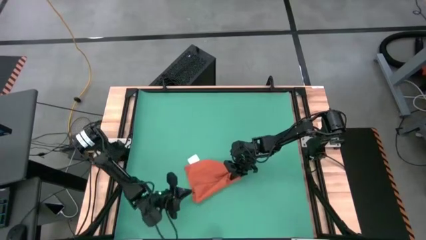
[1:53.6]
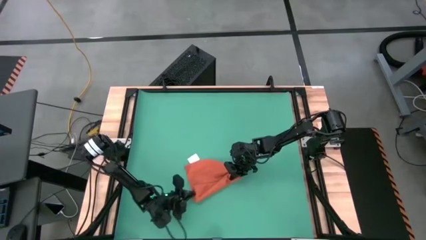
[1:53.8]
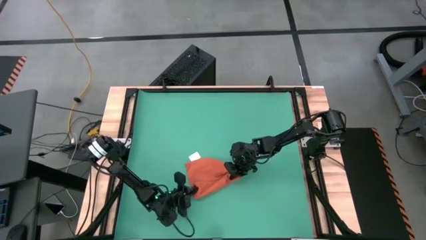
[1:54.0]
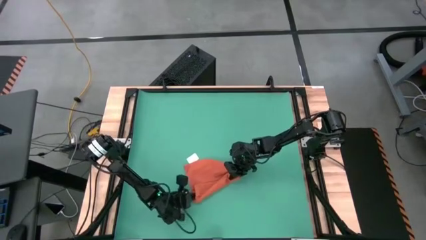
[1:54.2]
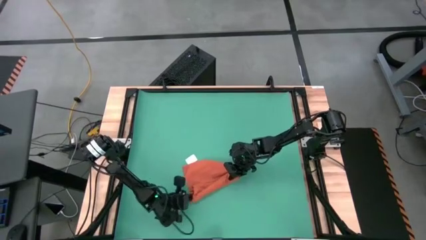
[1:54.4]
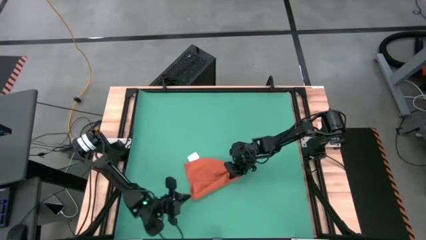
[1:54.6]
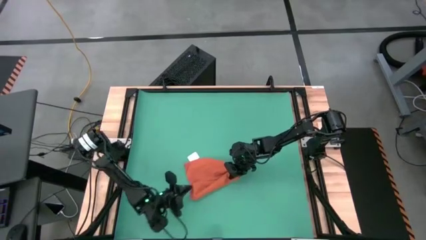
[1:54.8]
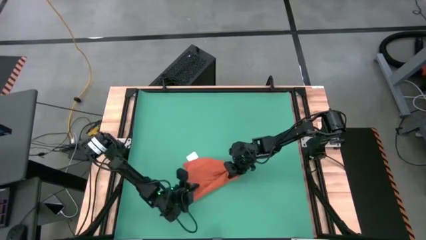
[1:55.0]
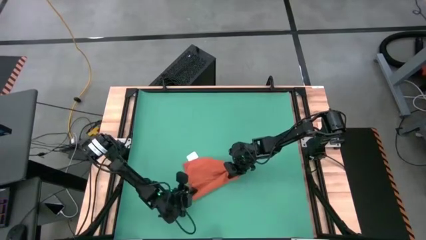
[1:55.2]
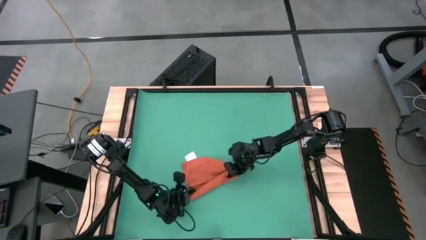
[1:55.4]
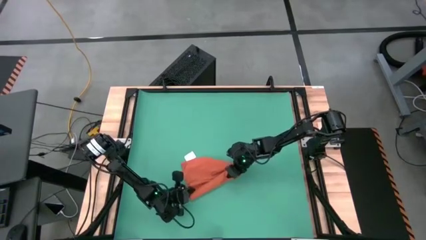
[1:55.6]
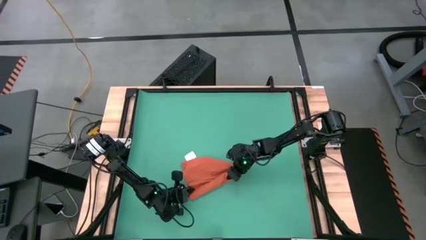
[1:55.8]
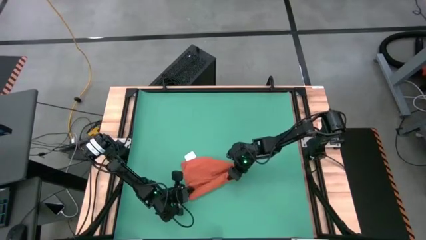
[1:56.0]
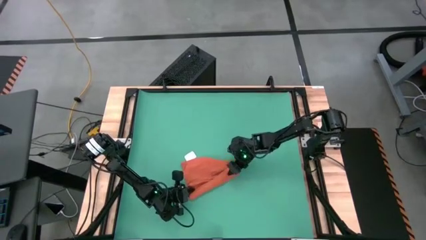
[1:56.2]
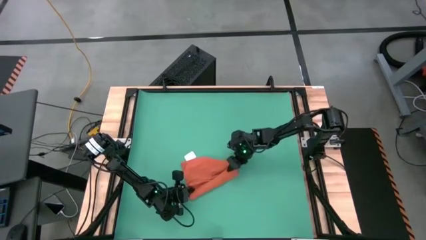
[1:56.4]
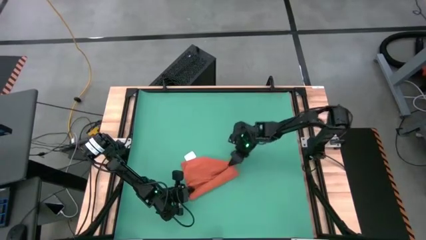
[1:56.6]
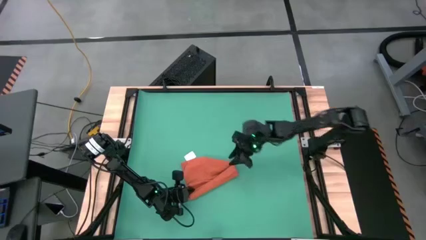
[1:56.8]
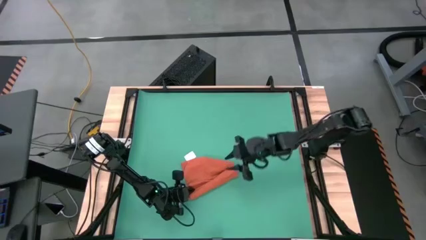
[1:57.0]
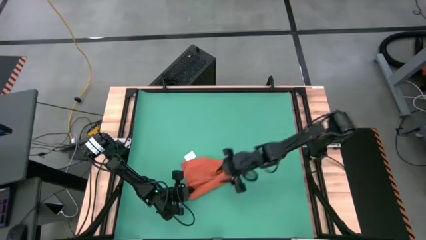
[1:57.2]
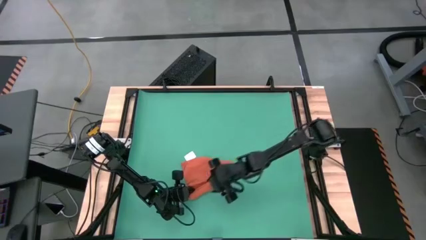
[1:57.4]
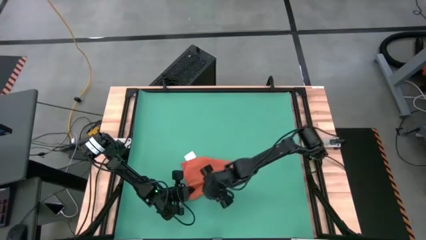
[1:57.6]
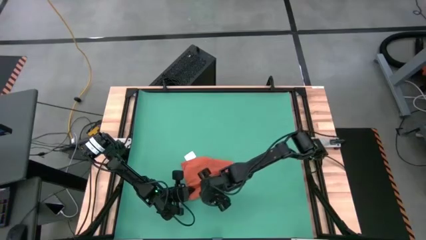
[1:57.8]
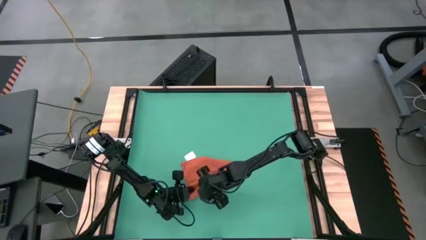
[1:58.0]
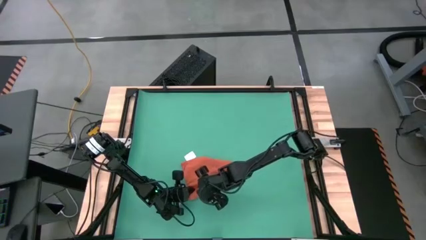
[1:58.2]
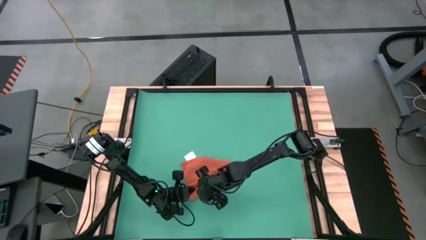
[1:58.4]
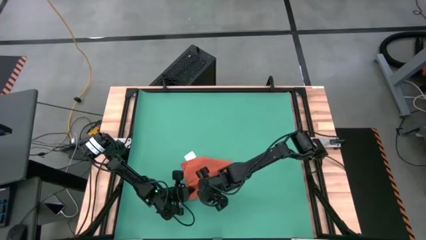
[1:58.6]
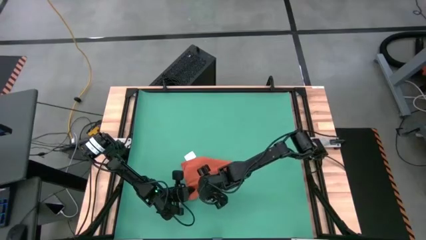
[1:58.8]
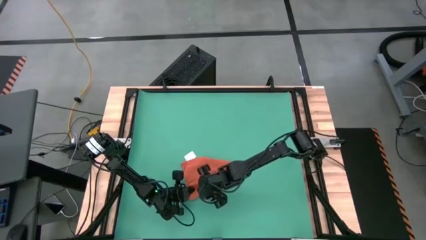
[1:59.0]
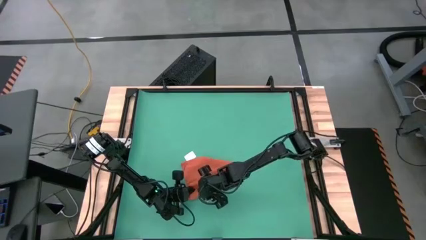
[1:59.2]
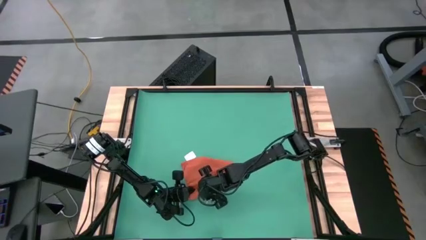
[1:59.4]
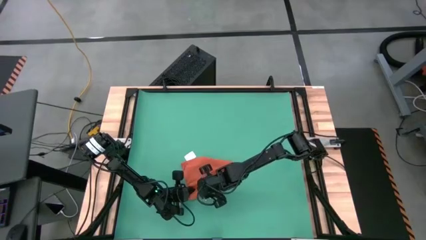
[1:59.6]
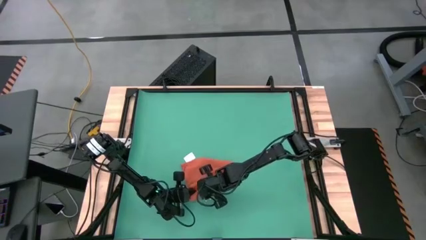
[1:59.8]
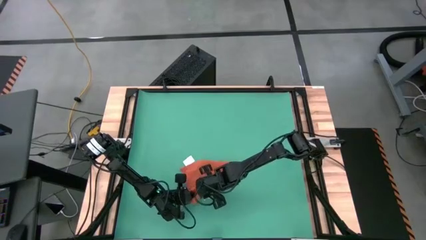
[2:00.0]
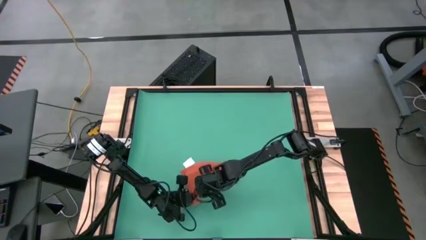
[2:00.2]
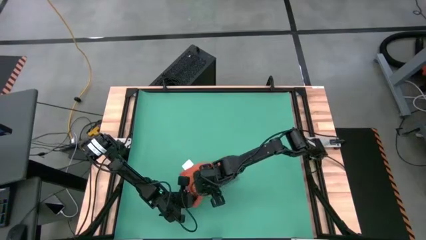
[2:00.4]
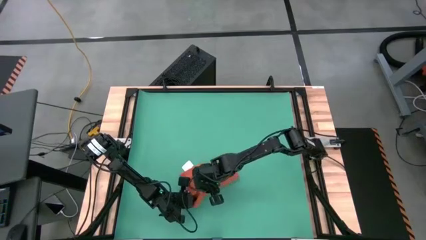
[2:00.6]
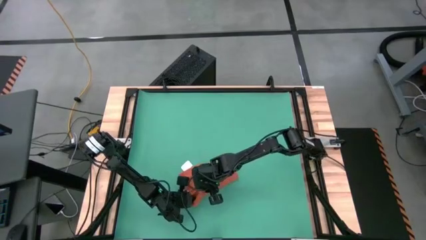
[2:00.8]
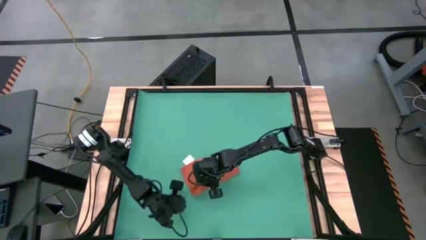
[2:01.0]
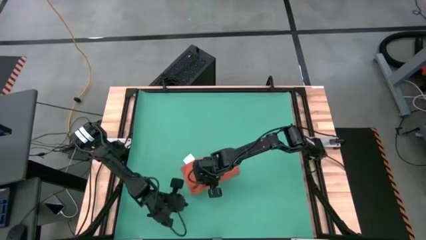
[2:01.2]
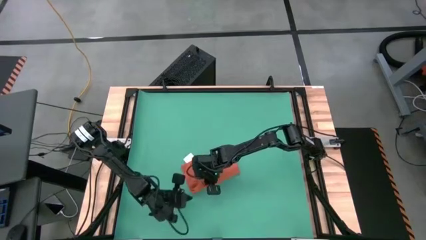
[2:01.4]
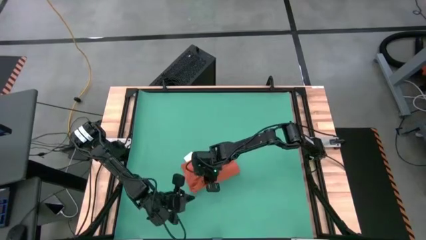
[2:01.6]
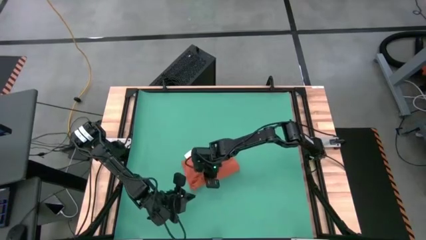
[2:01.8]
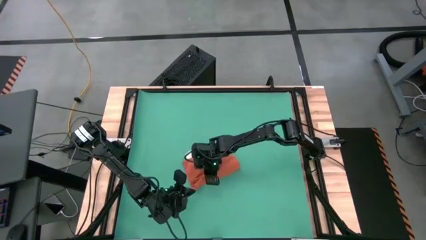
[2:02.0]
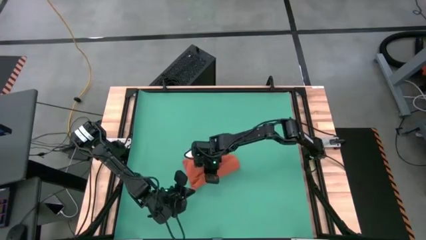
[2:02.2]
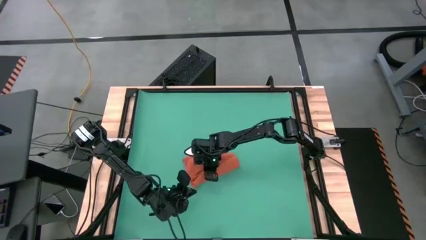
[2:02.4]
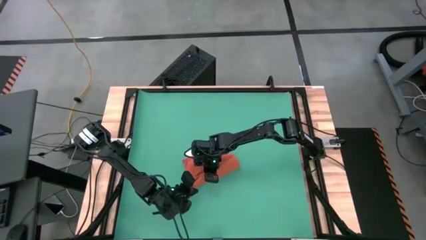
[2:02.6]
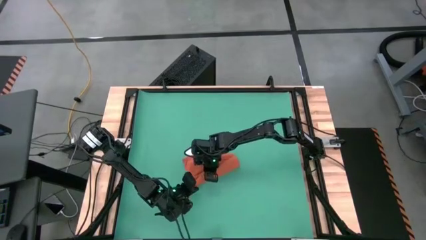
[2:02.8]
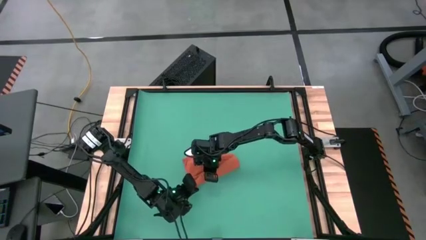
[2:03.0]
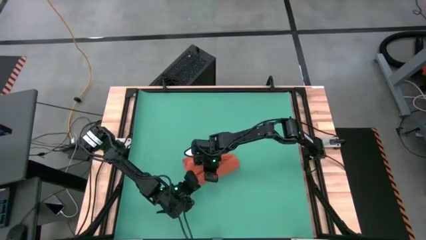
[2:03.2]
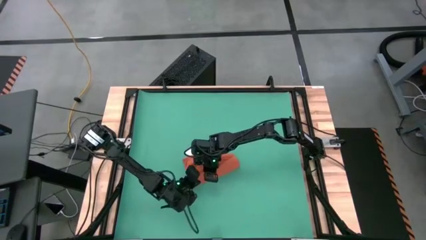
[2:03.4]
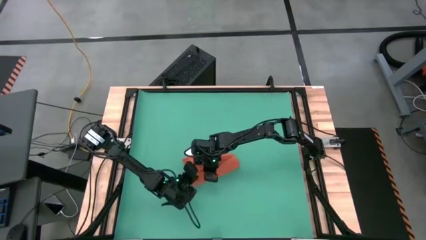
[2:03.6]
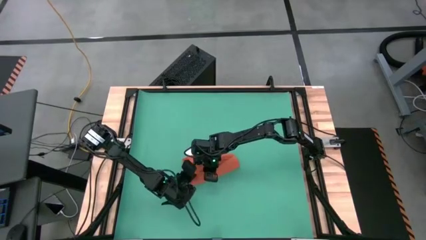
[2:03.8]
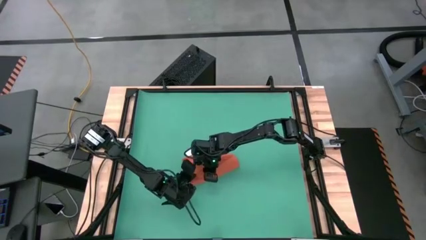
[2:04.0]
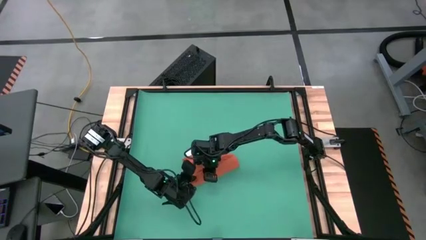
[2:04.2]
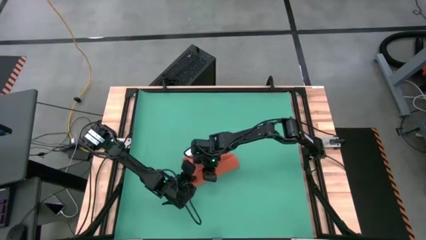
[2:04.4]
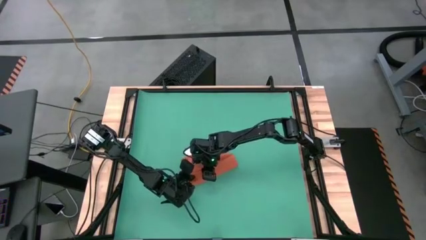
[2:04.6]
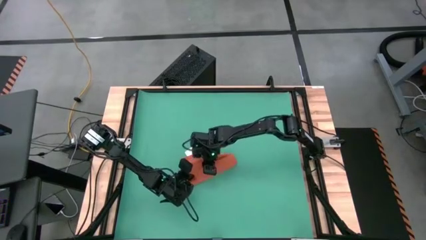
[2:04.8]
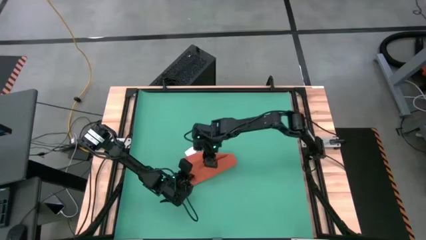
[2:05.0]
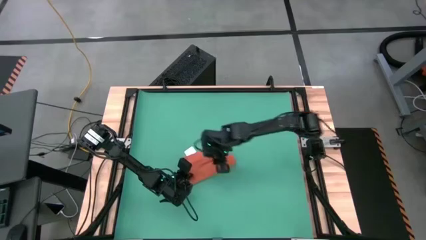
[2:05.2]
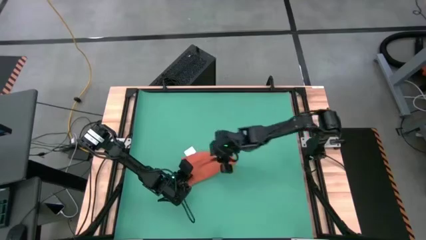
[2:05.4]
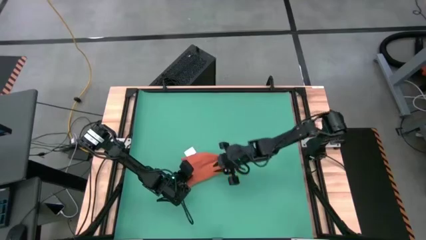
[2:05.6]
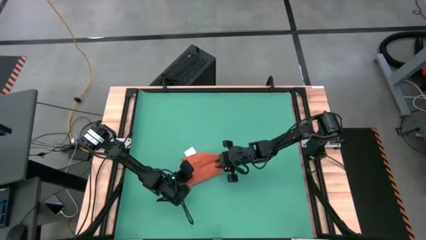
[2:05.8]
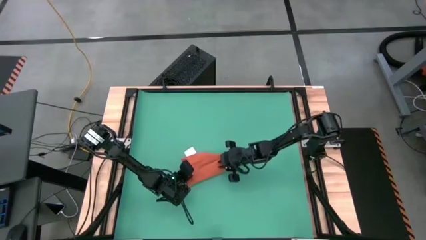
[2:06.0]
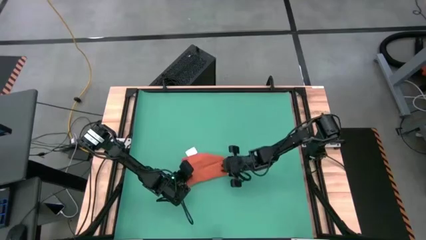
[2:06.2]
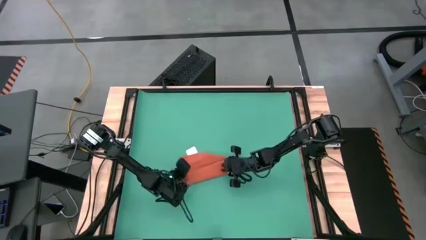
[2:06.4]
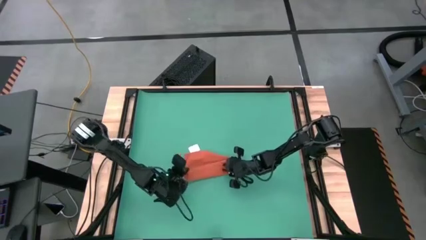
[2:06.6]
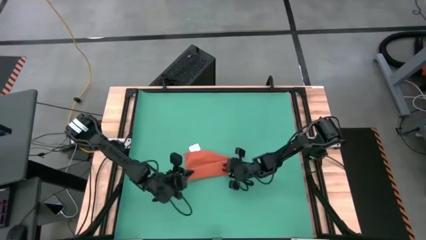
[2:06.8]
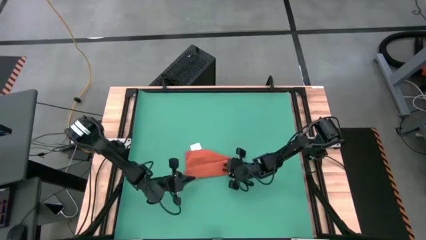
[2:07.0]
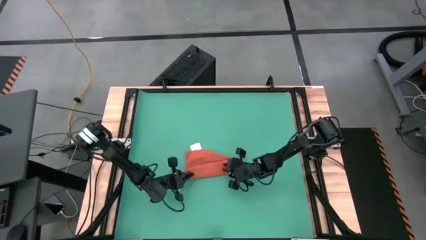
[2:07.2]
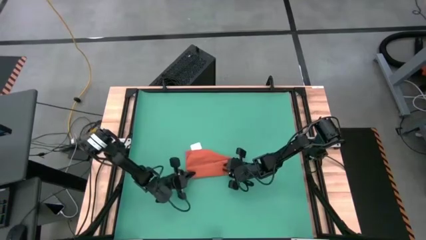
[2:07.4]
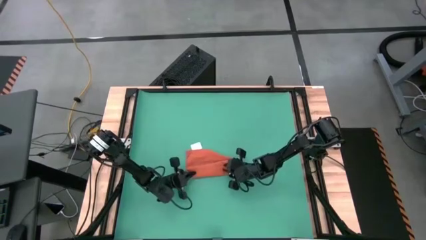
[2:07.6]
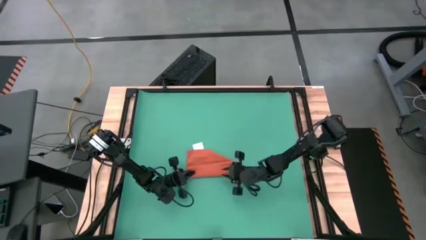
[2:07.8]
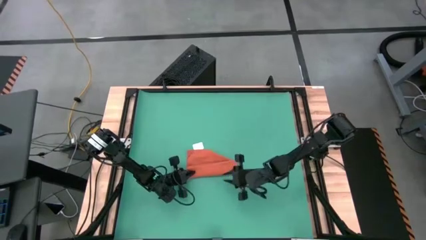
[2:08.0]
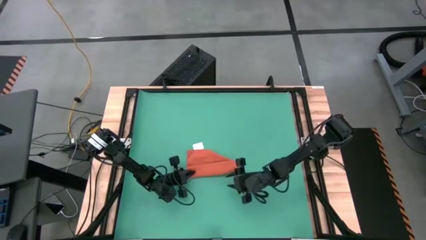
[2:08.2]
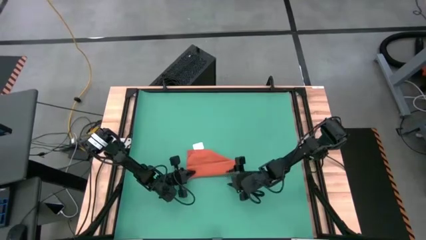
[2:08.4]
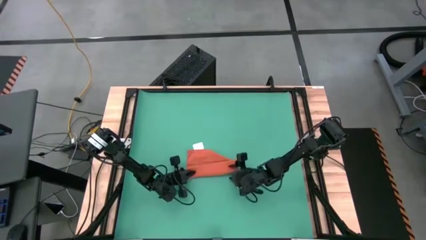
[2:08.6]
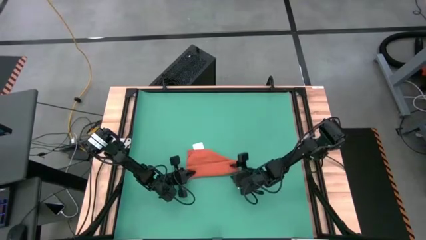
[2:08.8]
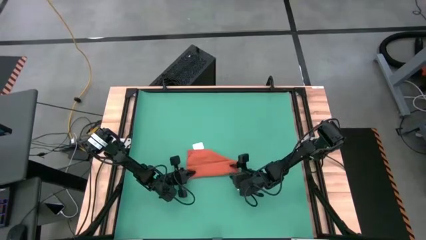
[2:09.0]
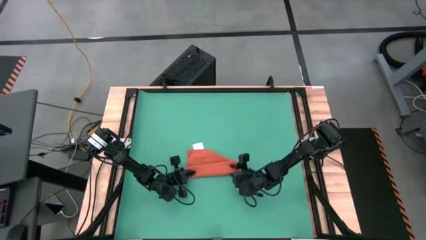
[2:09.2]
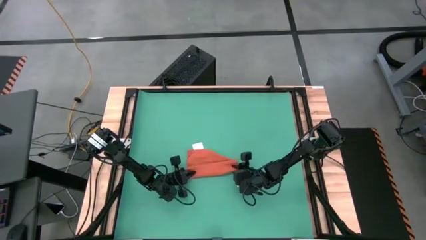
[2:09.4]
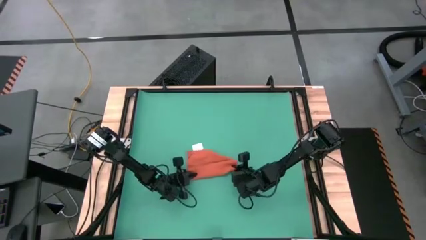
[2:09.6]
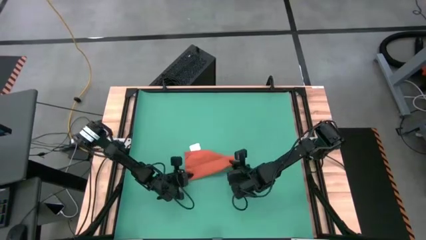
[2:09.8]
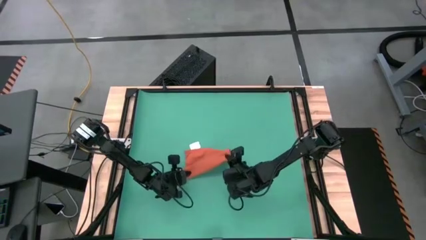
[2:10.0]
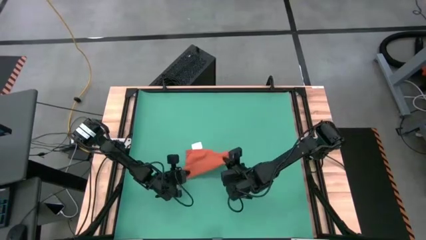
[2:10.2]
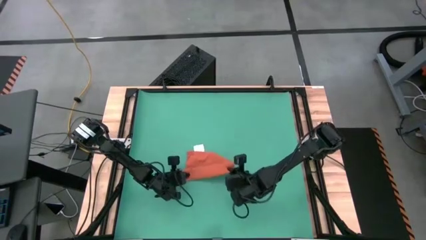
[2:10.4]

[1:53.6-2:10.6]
Task: Roll towel into tight, uniform cylinder
Roll the orange towel
